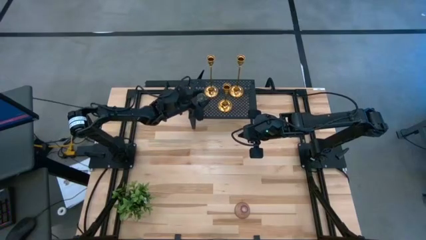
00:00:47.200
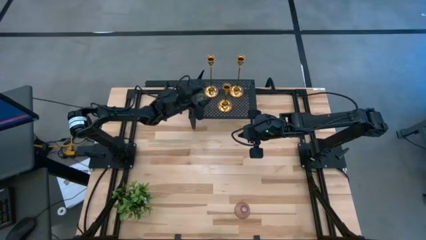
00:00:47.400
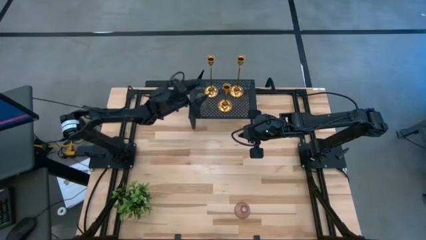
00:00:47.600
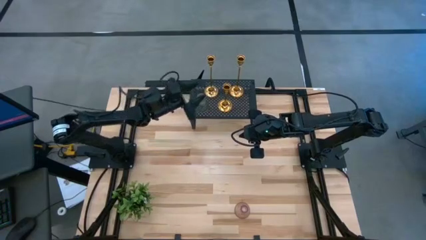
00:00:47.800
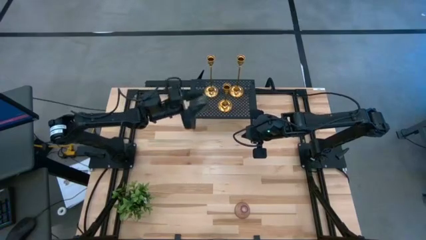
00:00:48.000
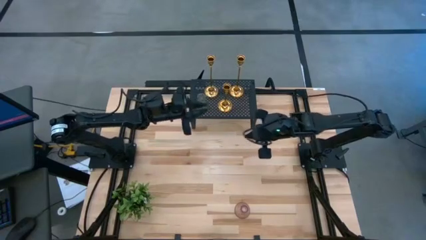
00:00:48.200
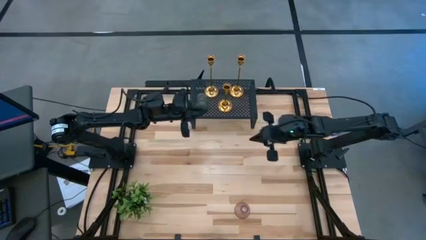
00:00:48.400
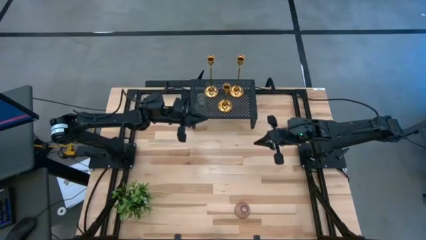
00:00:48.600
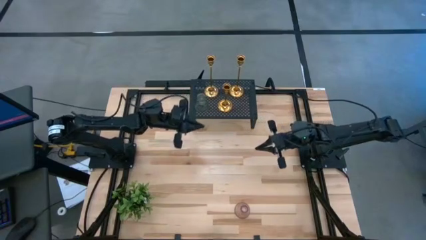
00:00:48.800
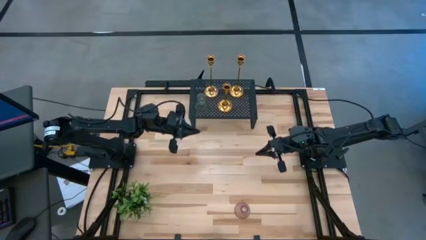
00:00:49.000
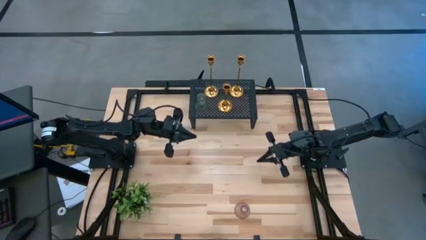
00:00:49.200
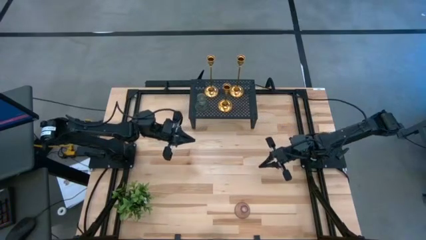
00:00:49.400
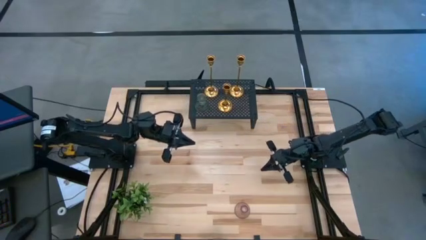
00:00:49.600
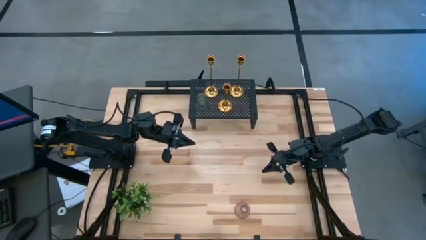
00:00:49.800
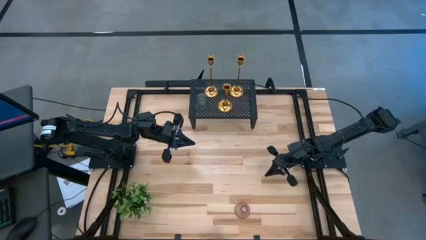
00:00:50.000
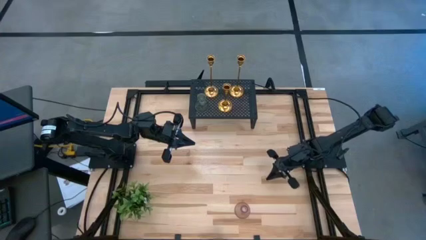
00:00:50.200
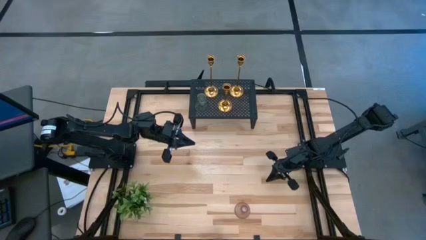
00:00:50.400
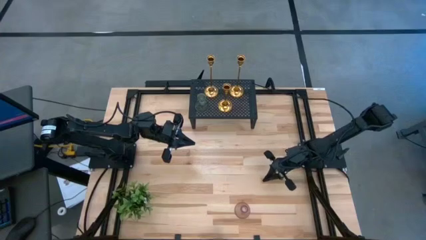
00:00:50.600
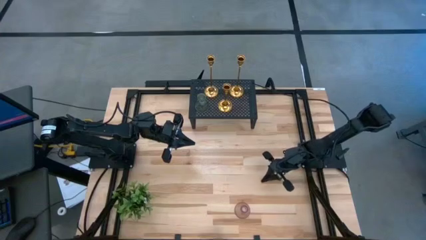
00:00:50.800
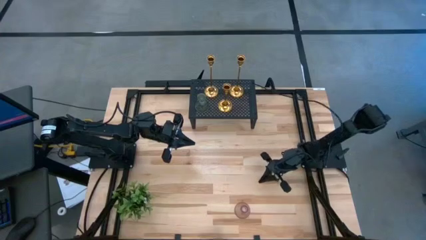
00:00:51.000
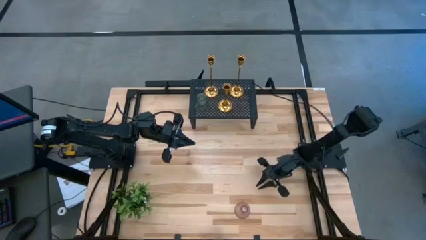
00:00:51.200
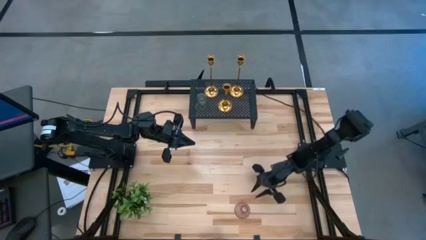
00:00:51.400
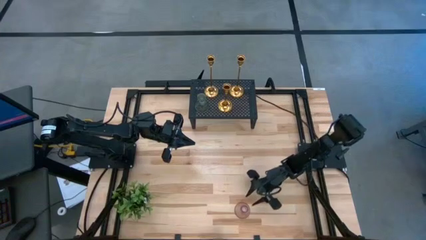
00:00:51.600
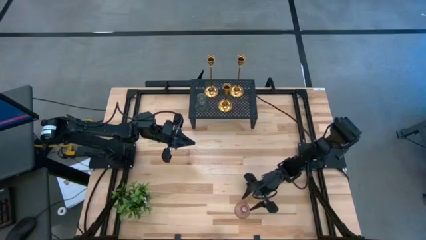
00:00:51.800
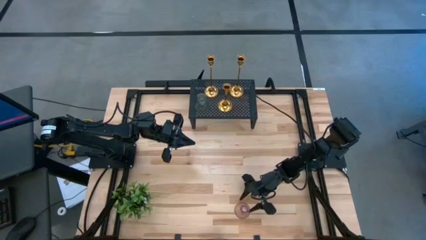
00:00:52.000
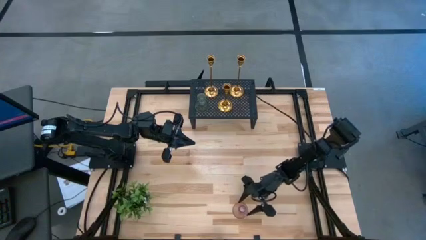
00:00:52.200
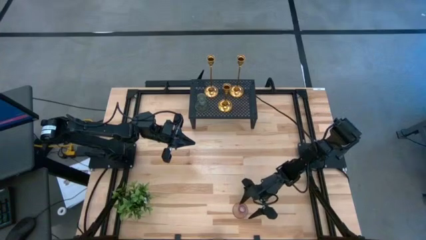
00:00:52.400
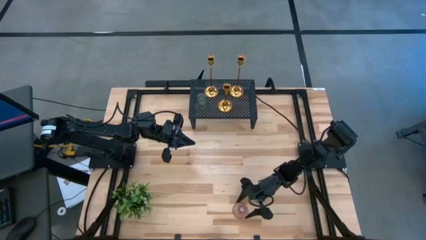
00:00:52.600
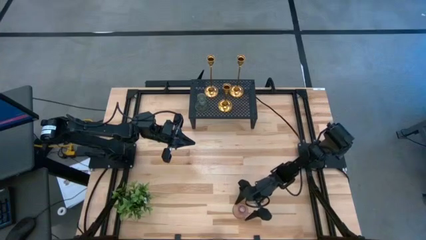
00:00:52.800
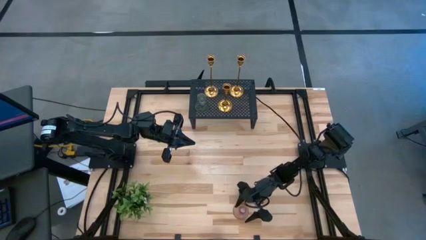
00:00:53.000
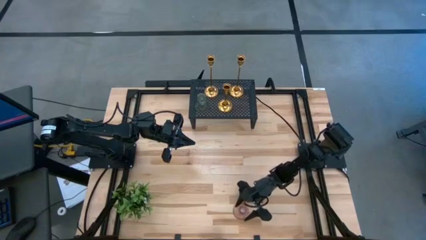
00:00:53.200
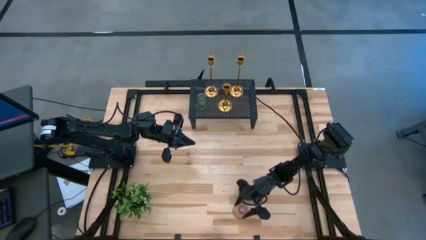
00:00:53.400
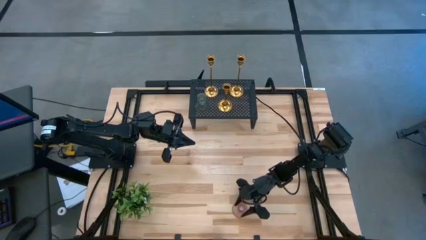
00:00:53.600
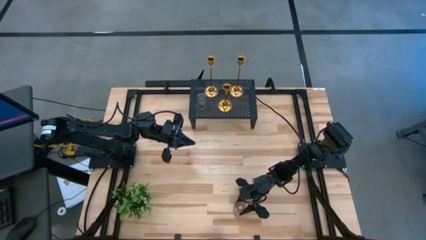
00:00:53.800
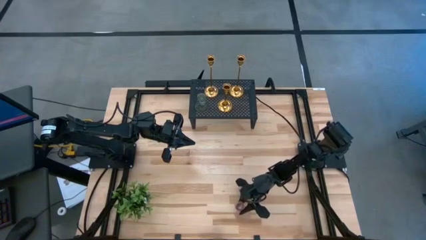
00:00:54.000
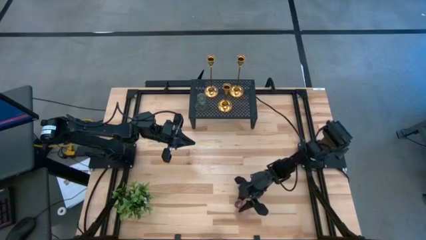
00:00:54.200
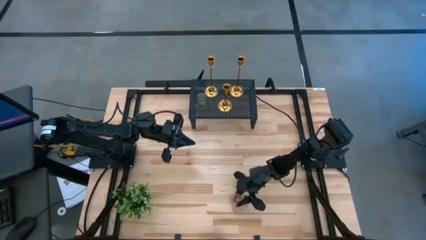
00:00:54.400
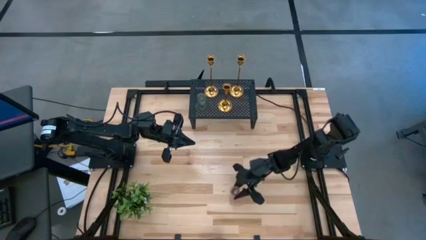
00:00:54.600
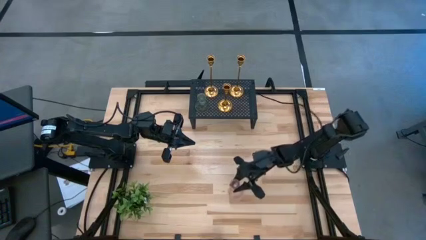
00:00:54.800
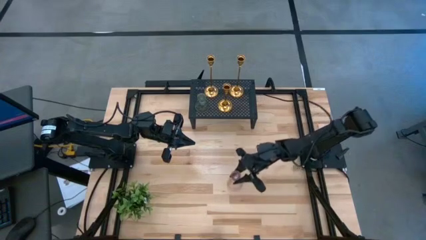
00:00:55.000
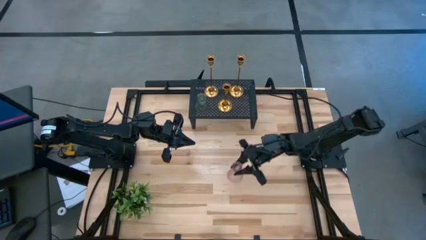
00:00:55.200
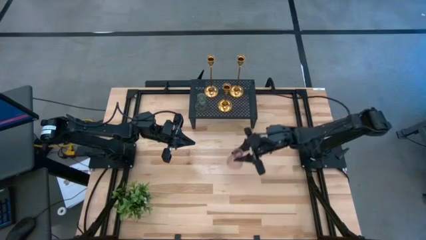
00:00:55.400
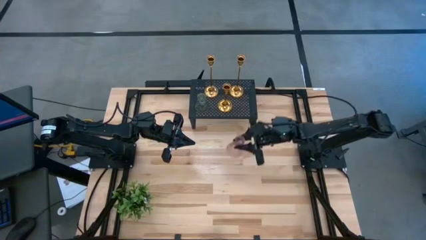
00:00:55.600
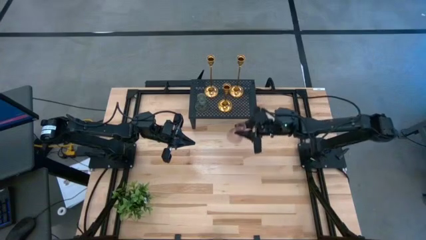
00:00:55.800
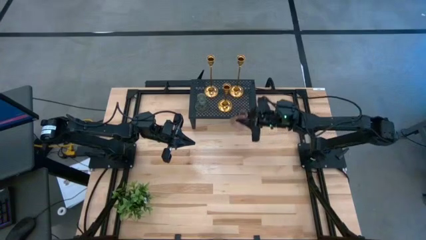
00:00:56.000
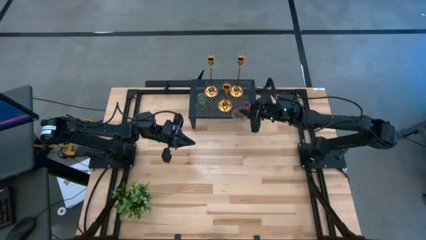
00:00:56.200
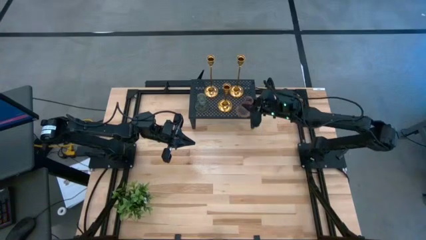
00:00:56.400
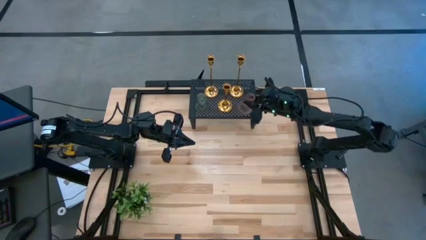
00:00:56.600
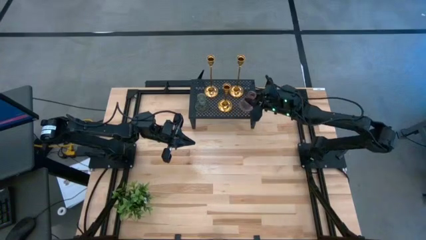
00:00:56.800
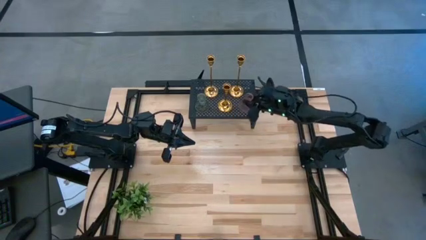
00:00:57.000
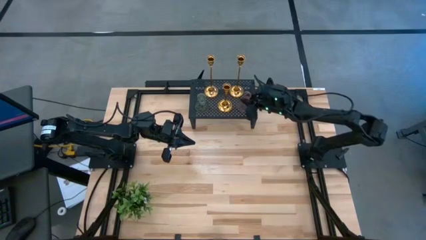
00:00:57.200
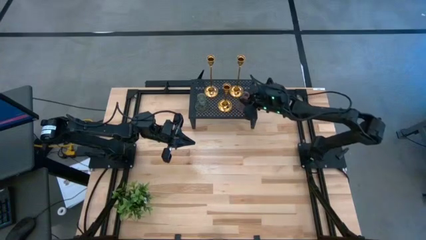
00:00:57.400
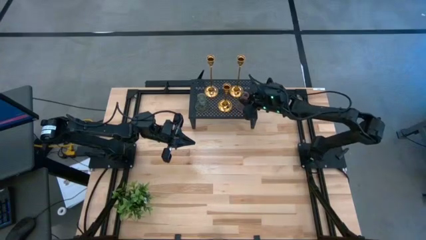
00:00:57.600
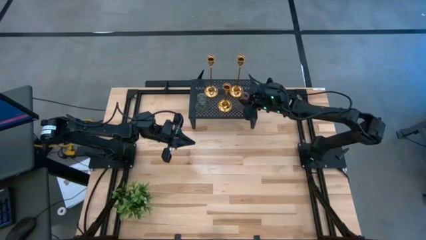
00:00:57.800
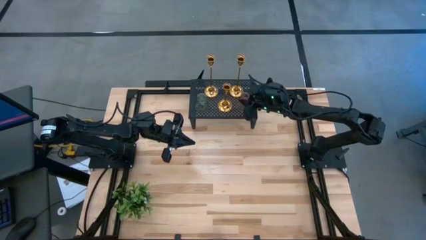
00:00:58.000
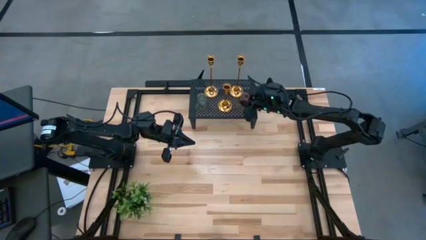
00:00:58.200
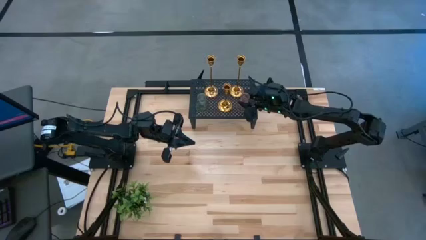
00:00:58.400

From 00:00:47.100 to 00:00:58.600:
Task: Pick & Place candle stick holders
Put the pink glass candle holder on the shelf
